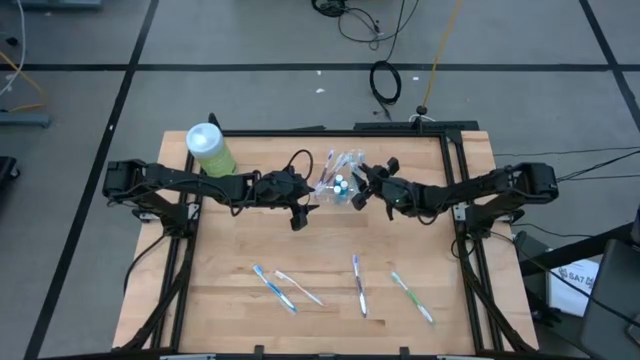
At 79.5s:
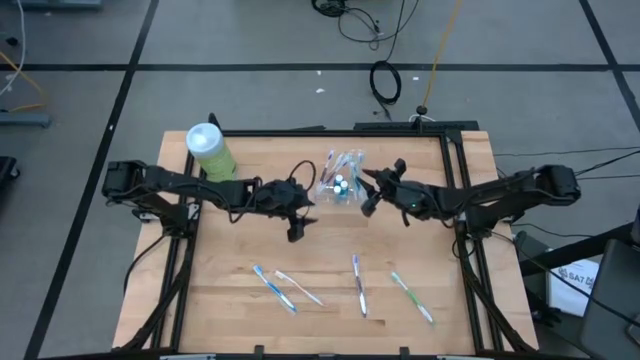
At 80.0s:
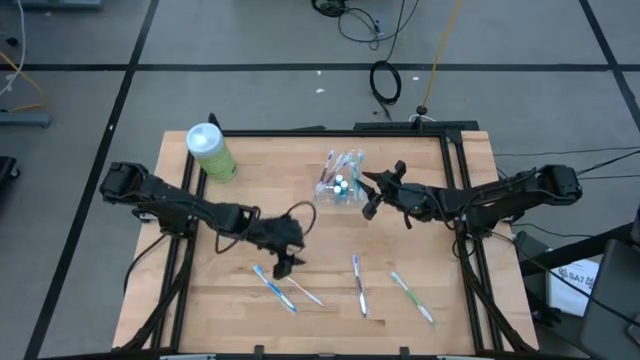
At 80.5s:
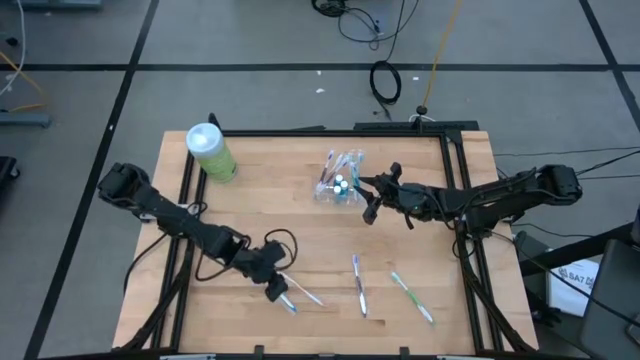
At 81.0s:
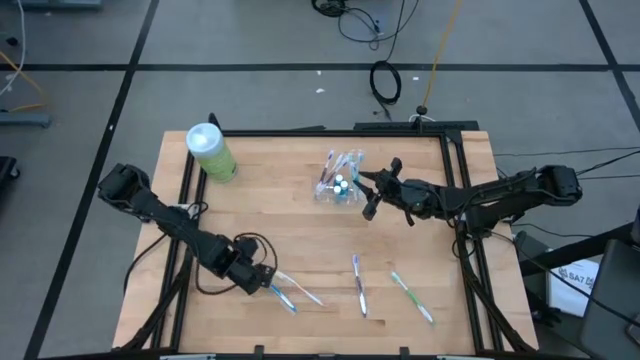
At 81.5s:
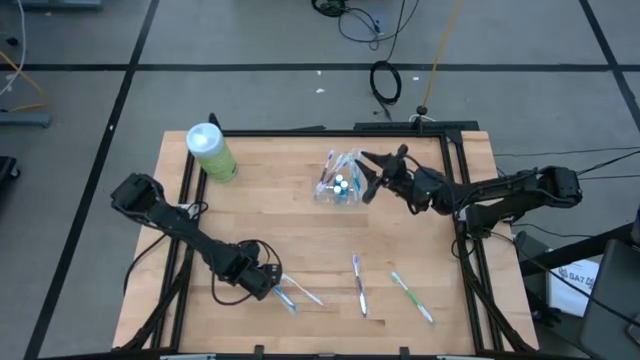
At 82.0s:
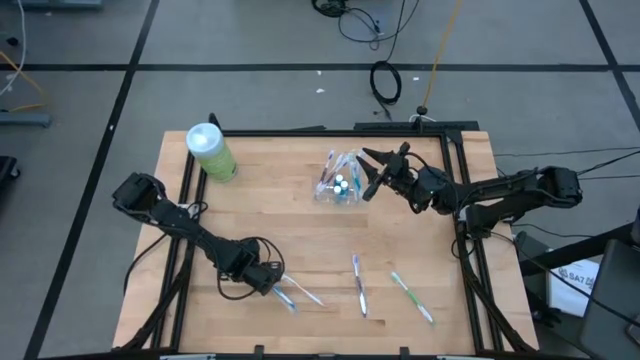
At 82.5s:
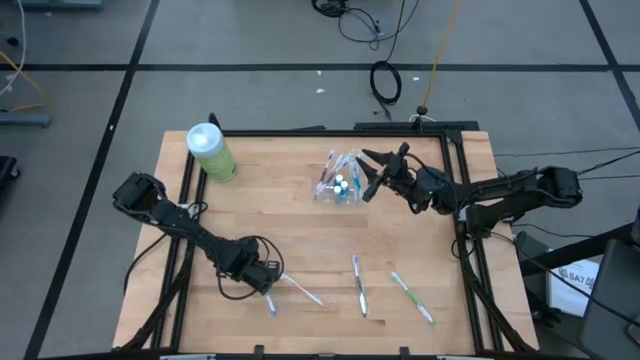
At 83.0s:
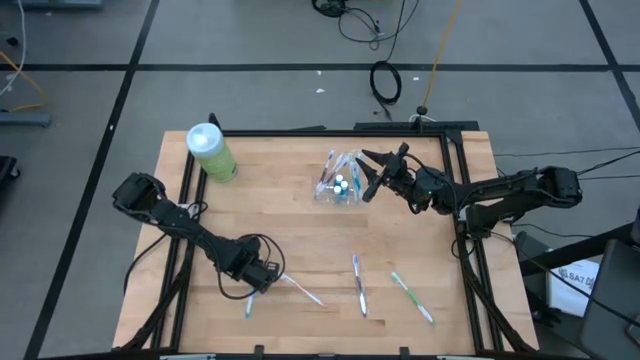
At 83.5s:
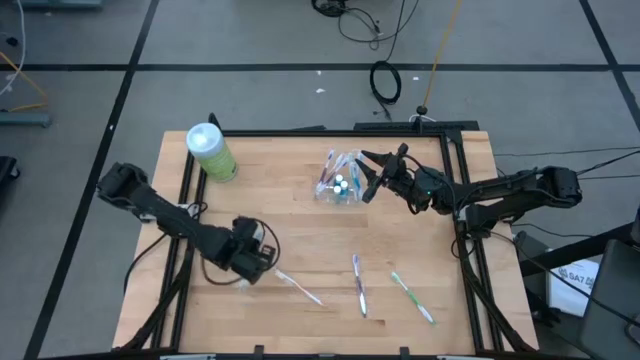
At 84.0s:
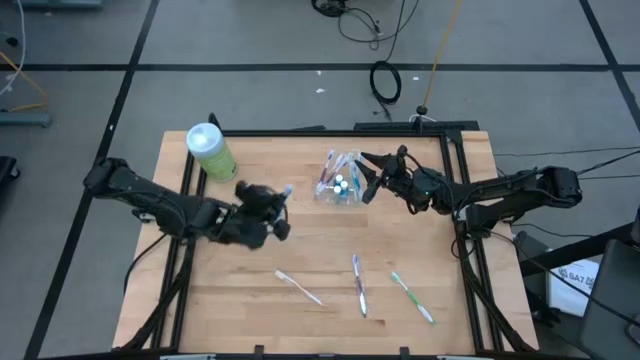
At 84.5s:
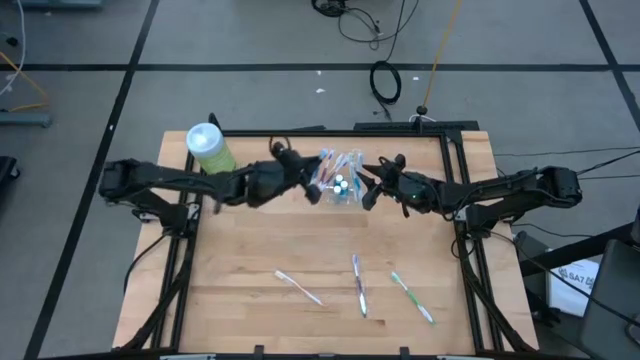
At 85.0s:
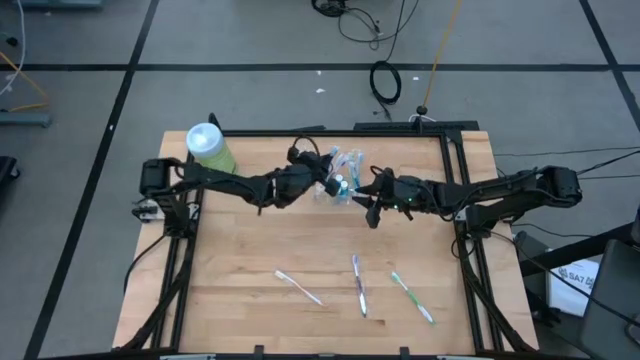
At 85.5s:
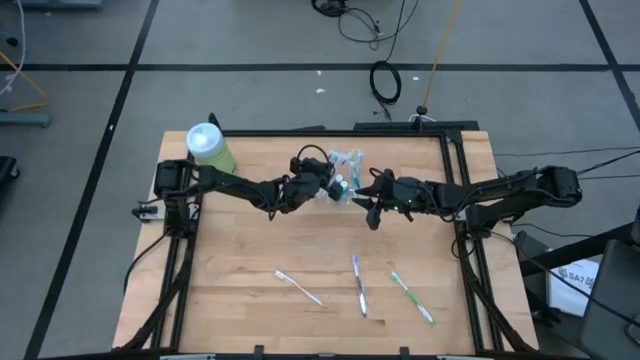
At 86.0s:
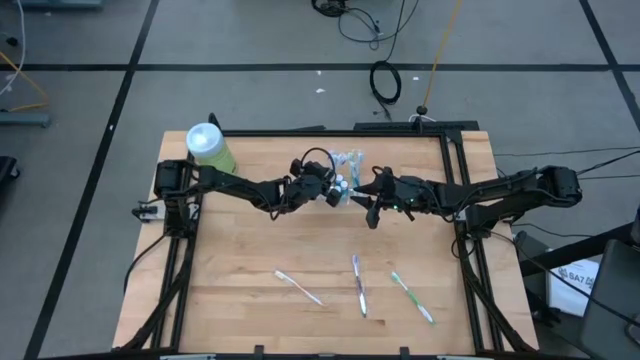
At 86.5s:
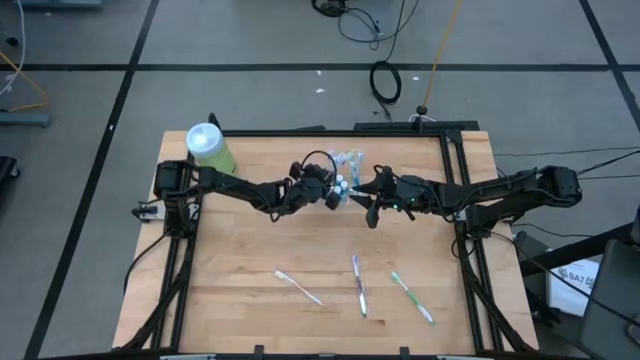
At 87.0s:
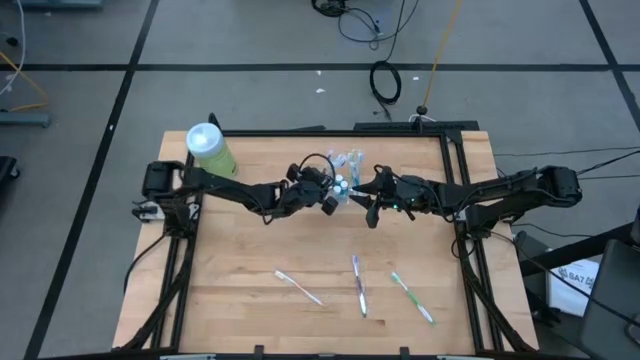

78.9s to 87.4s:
Task: Pick & Place toothbrushing station
Put the blue toothbrush into the transparent organizer

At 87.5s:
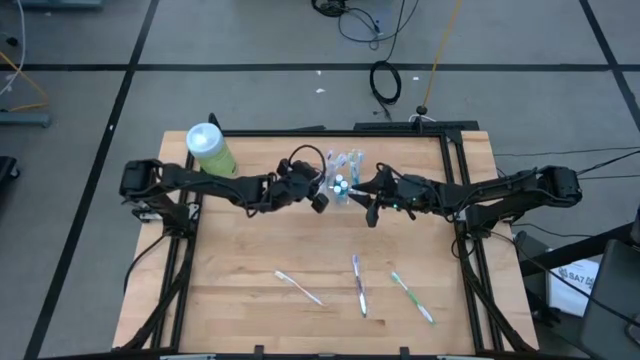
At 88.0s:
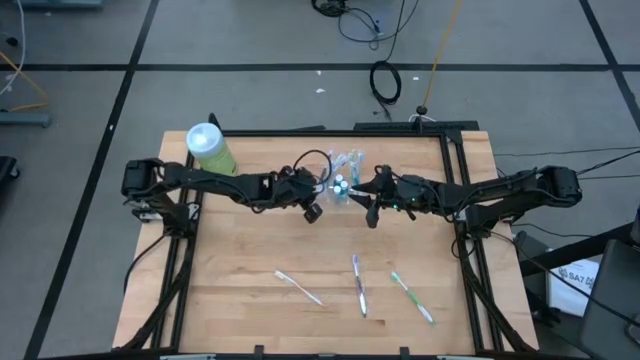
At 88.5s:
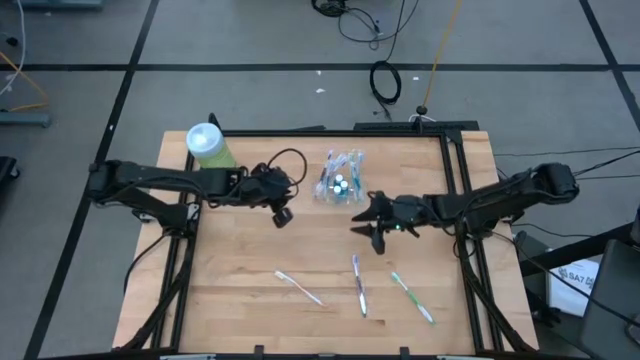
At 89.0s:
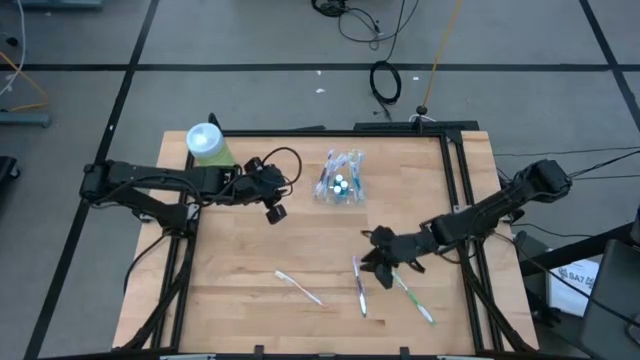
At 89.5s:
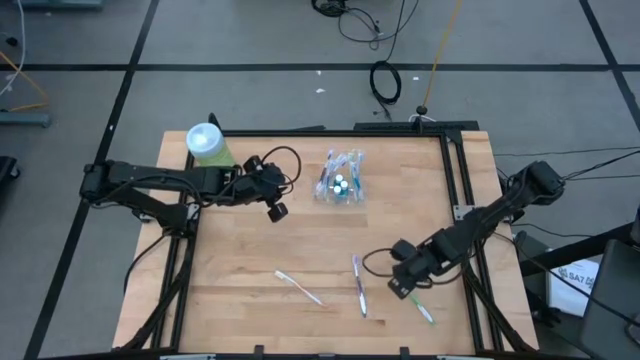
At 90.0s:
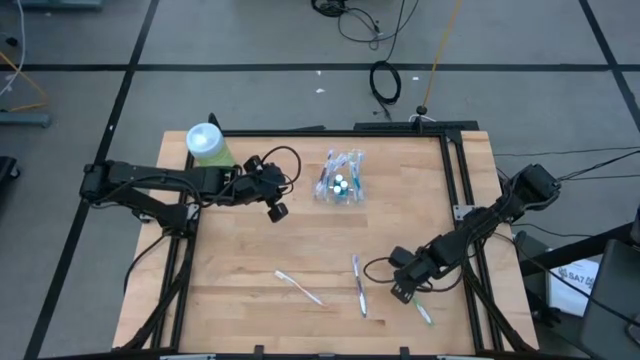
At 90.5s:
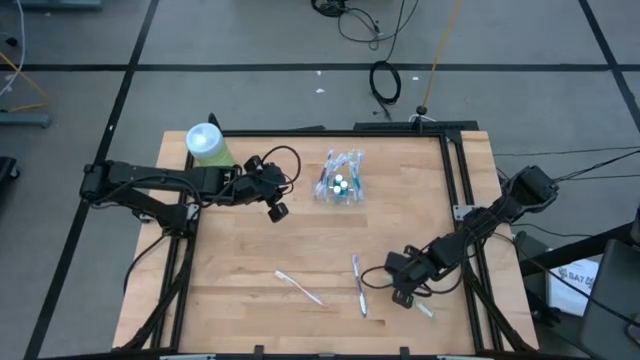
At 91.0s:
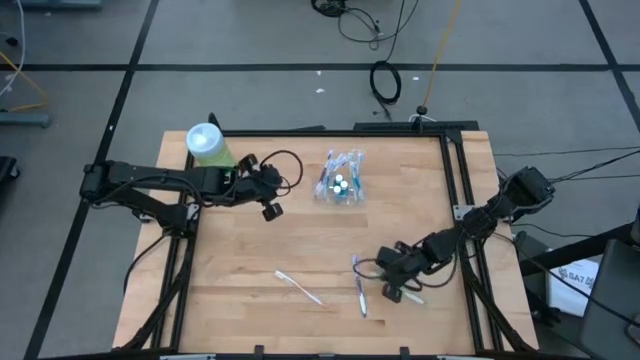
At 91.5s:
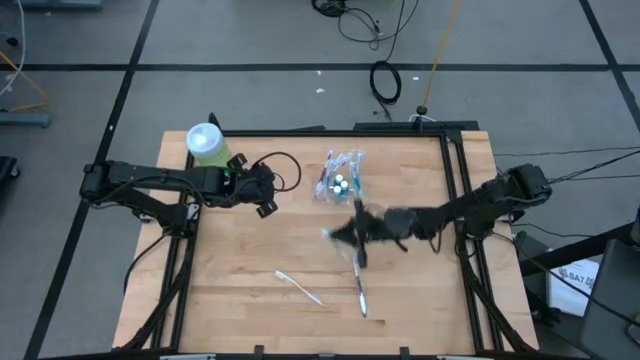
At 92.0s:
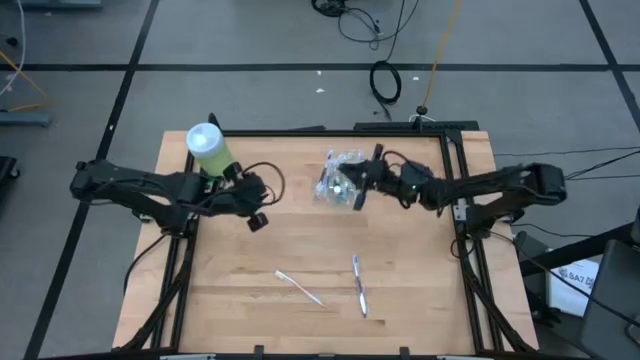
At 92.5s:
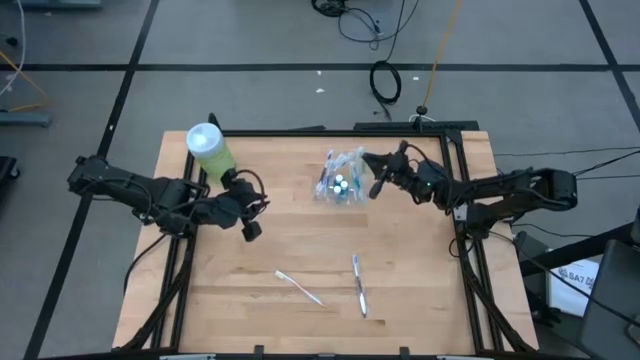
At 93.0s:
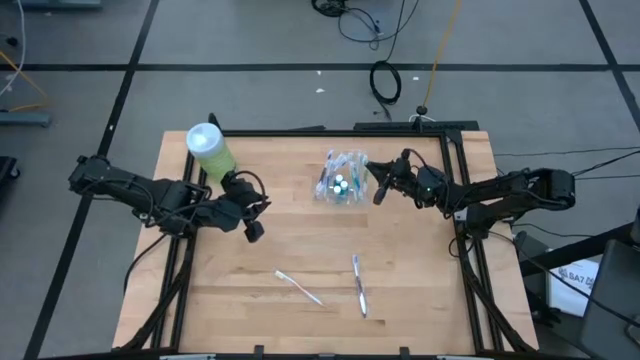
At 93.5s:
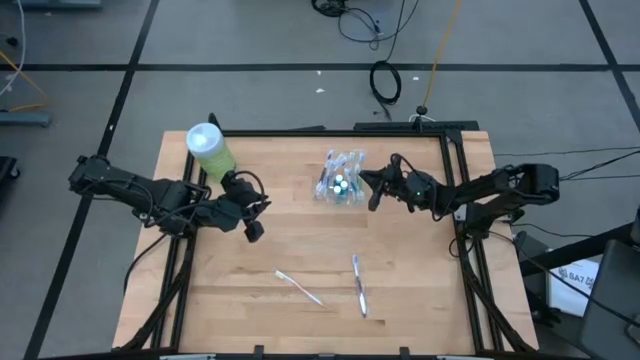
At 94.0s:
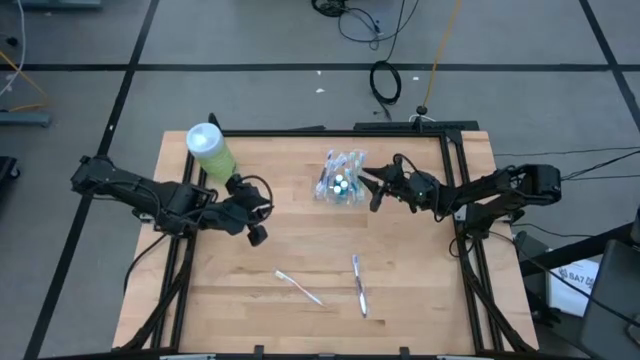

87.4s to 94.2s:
Put the green toothbrush into the transparent organizer

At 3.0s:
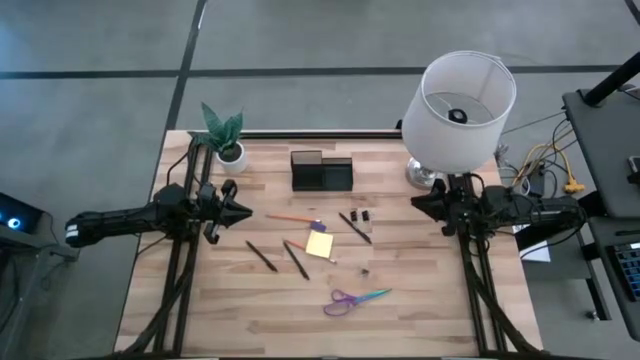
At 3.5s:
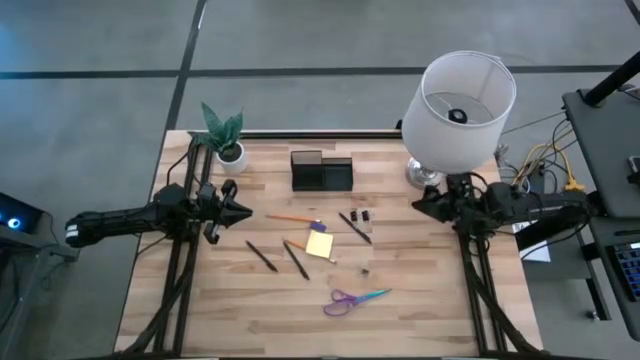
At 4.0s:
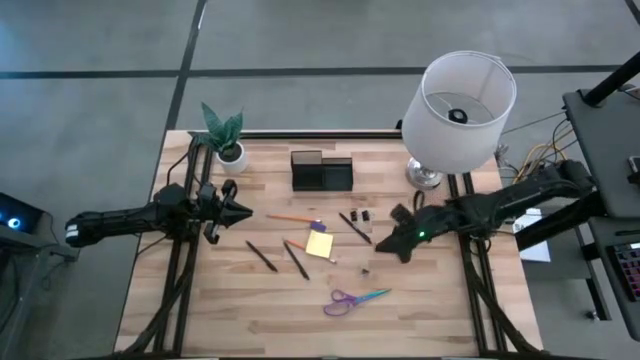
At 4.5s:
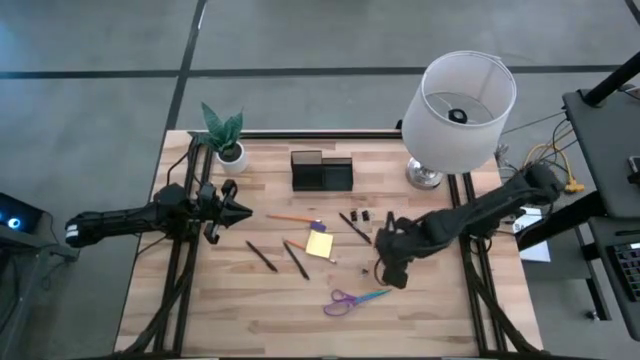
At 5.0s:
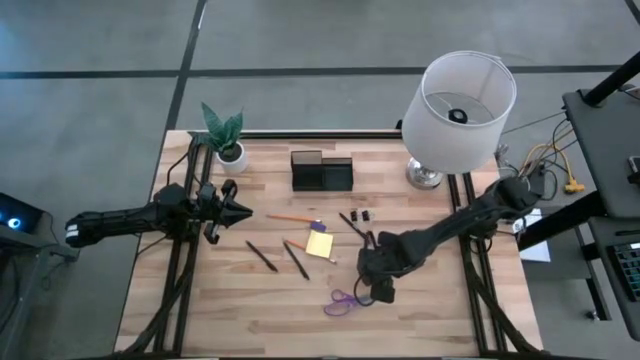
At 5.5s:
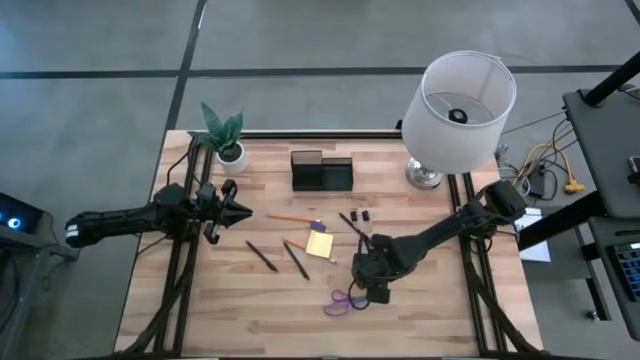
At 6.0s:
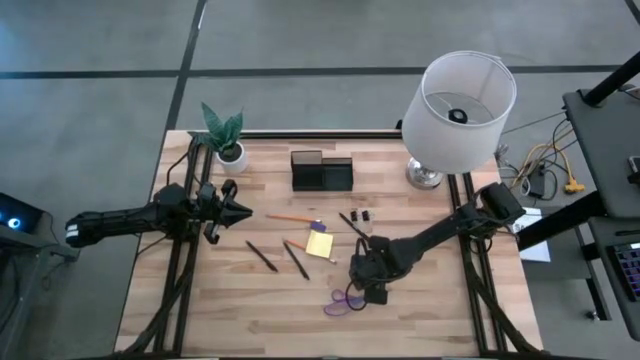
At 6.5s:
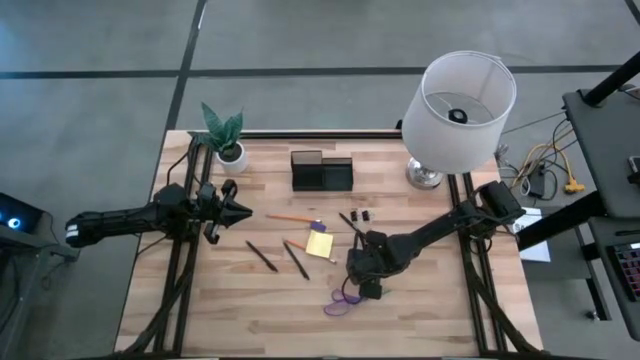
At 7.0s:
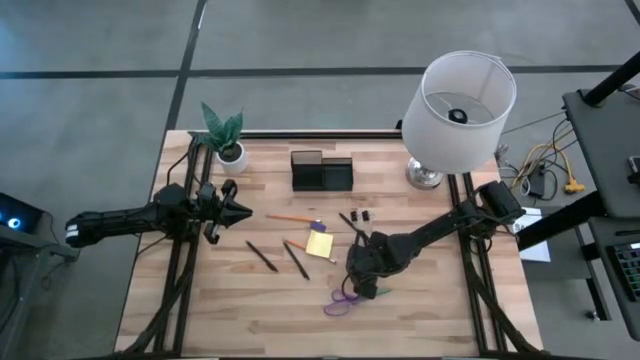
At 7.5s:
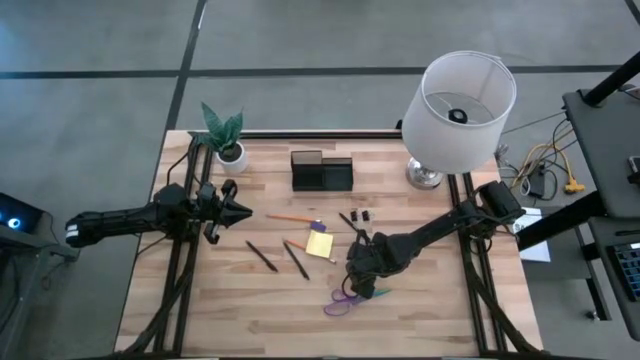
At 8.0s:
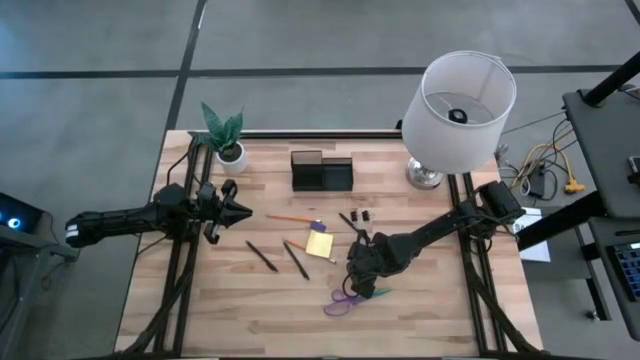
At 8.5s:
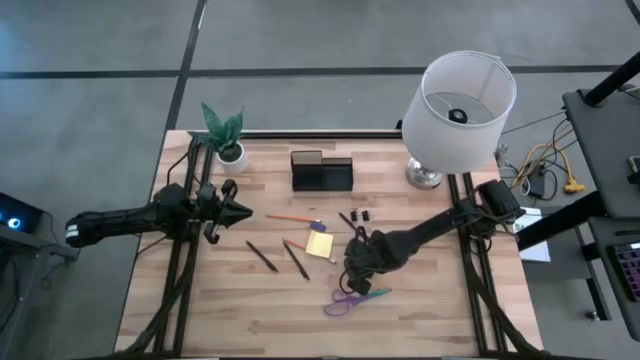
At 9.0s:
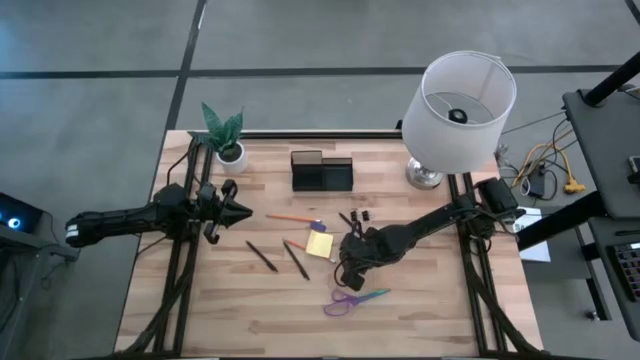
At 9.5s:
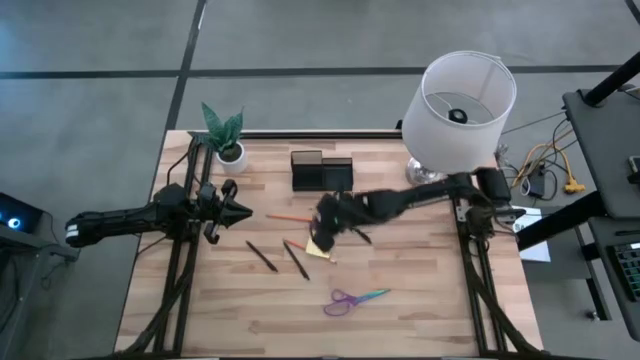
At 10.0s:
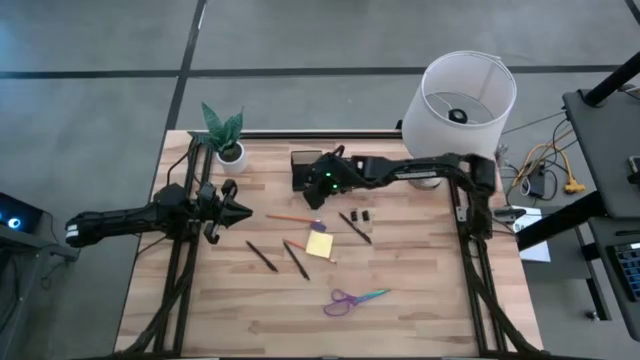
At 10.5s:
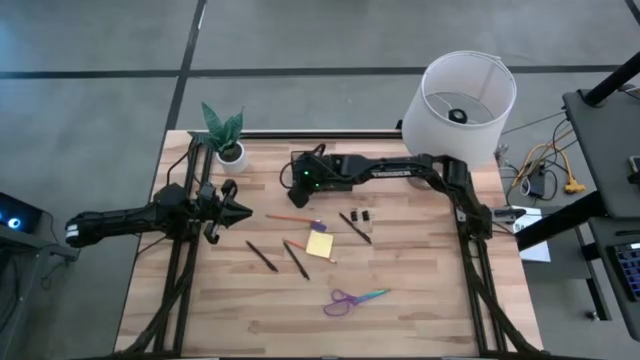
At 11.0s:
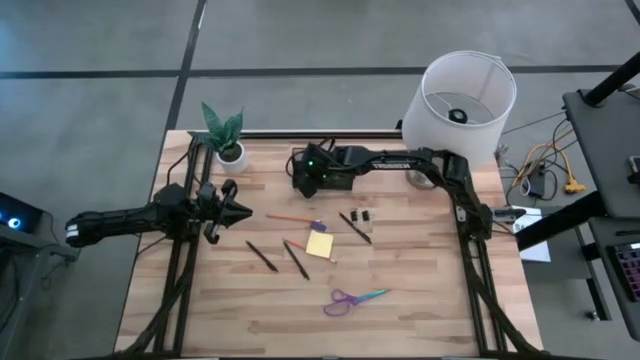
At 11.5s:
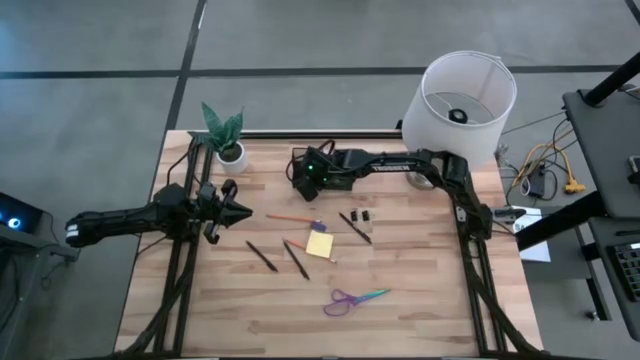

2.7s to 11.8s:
Task: Pick and place office supplies into organizer
Put the bottom black binder clip into the black desk organizer
